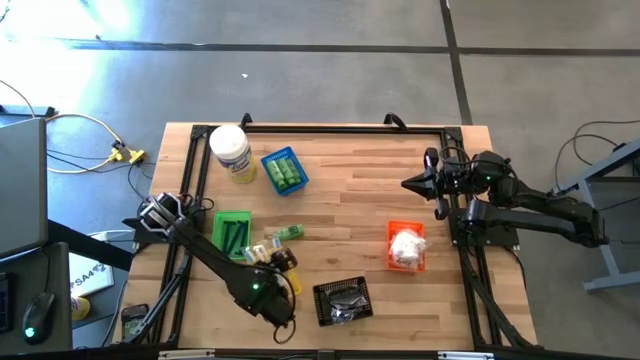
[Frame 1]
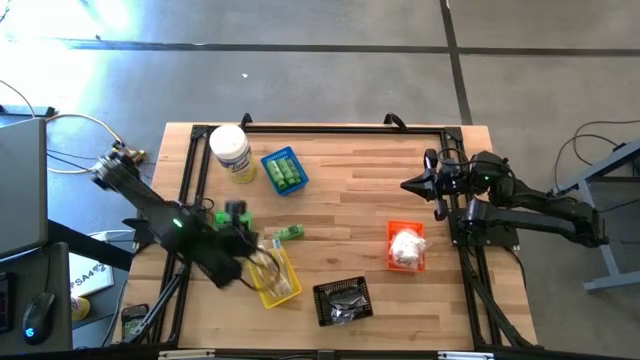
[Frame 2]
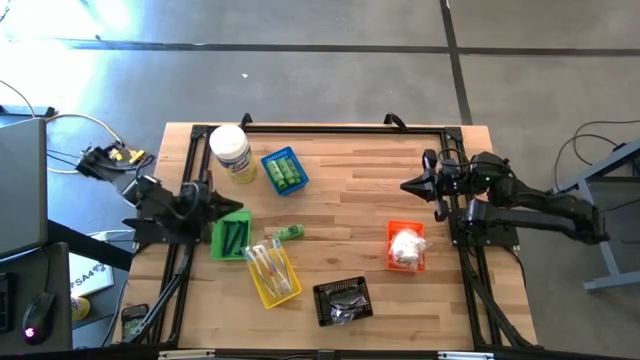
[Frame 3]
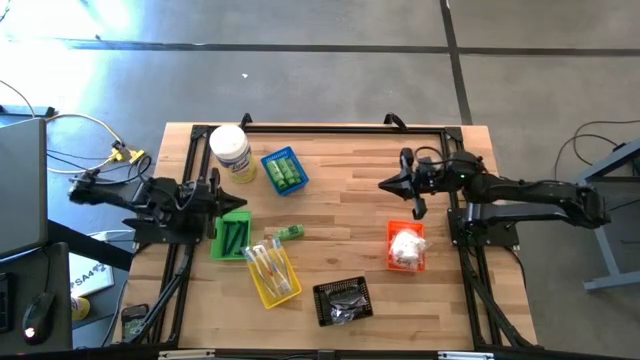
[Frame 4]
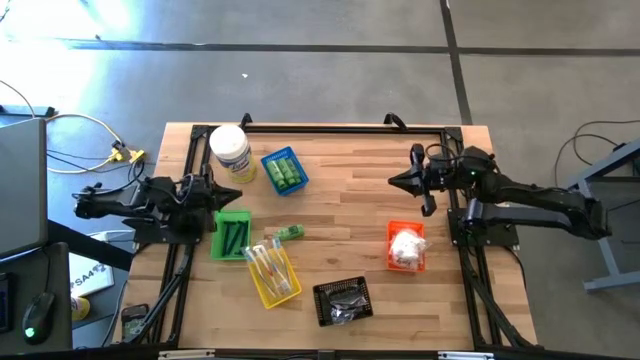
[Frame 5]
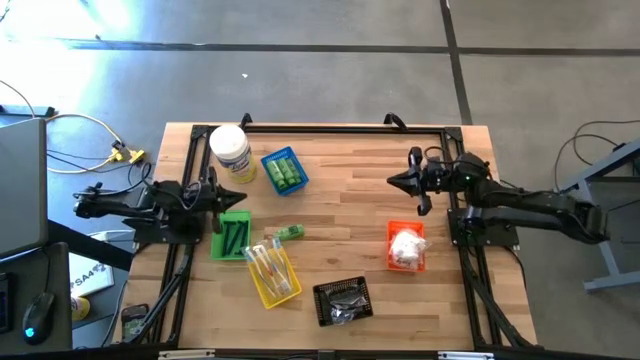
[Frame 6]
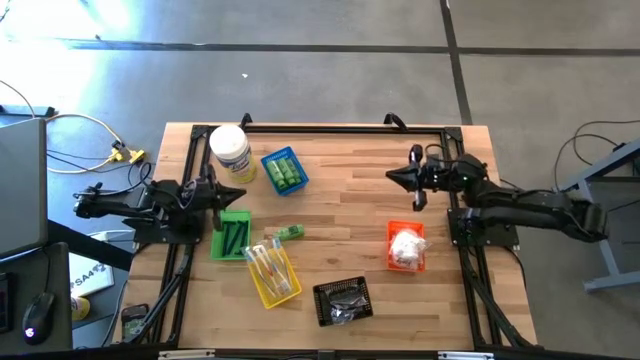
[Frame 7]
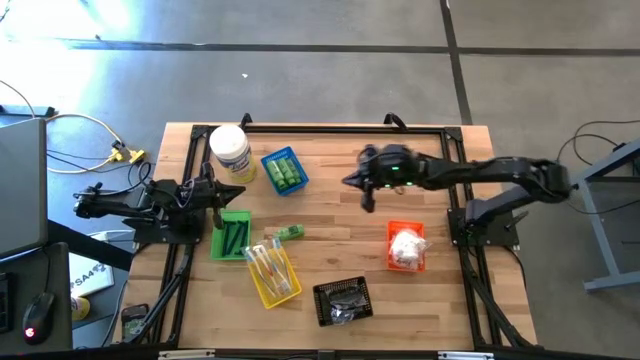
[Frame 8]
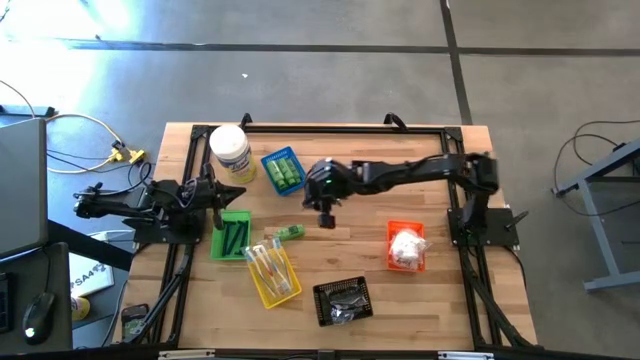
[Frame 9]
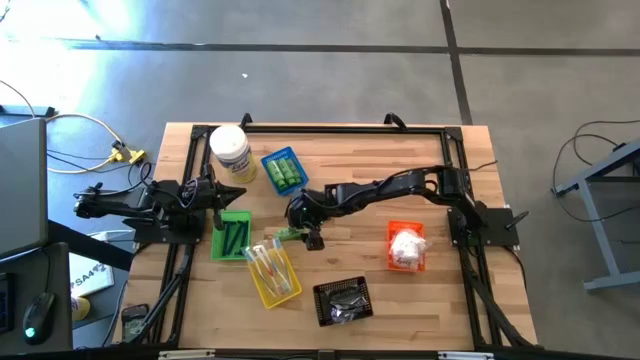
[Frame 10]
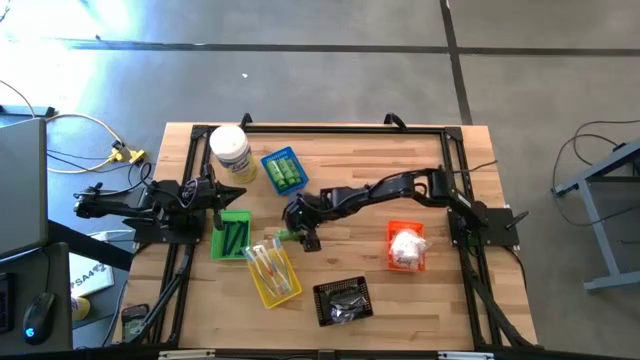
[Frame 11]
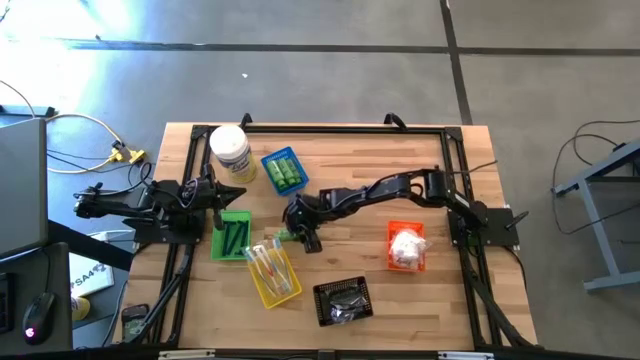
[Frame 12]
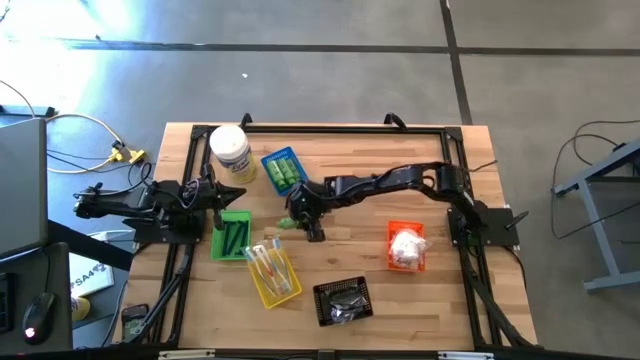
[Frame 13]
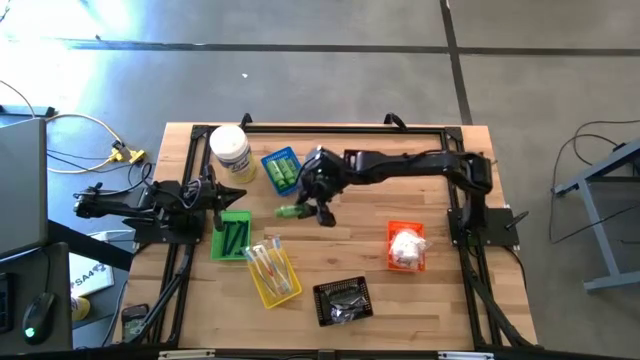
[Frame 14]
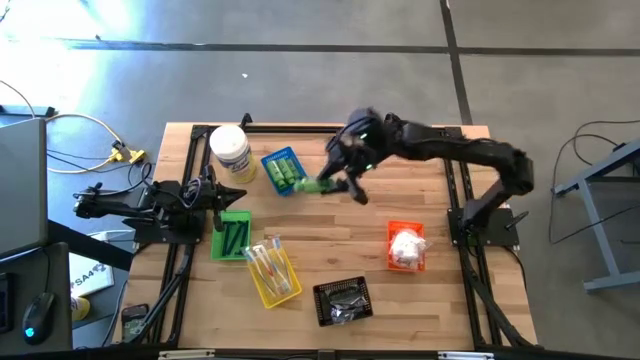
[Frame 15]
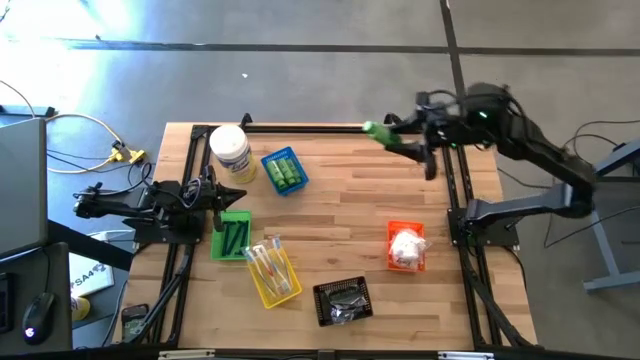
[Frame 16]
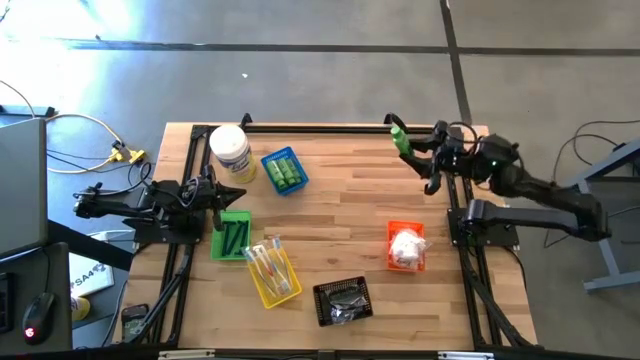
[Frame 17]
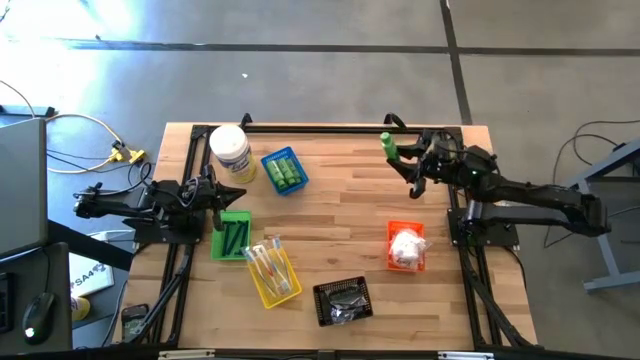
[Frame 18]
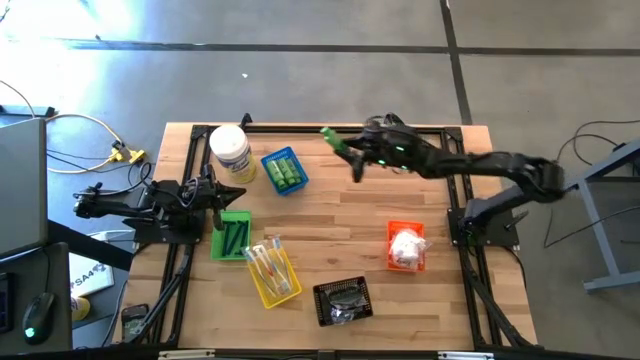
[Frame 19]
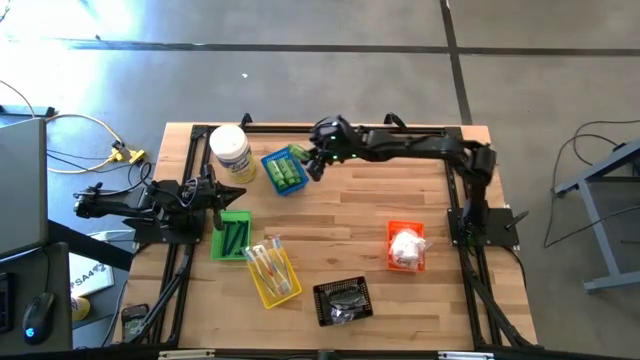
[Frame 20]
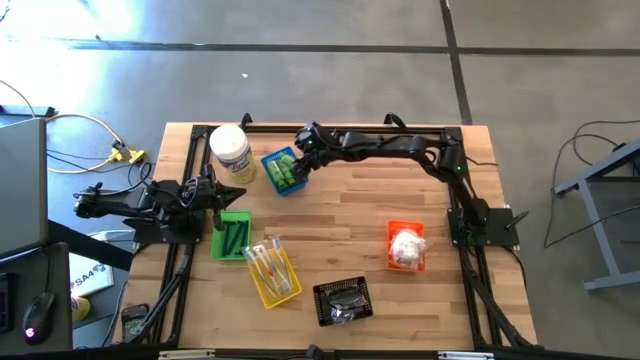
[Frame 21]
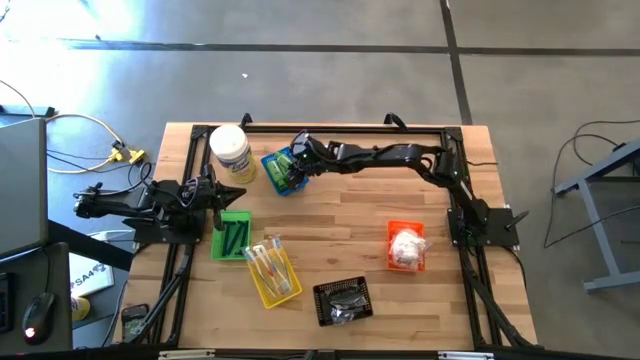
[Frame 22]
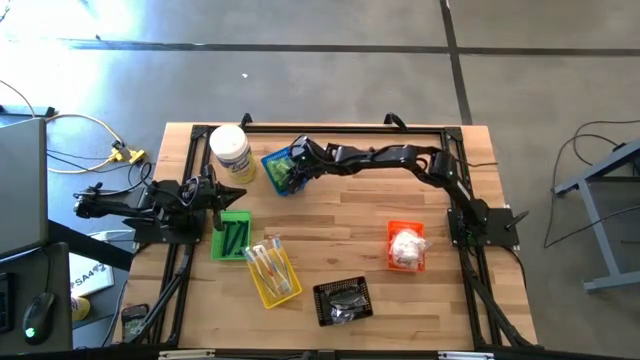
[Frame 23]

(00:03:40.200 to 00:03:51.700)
Task: Pick & Place Travel size toiletries
Put the green shampoo into the blue bin

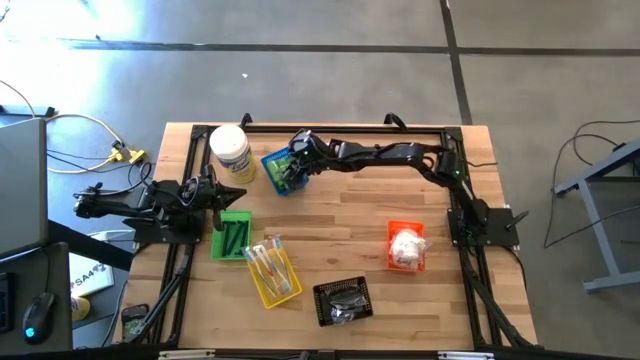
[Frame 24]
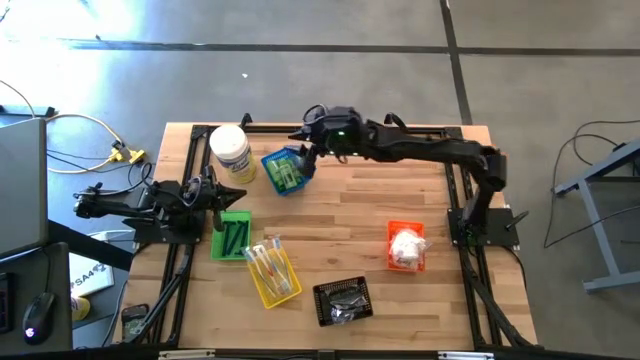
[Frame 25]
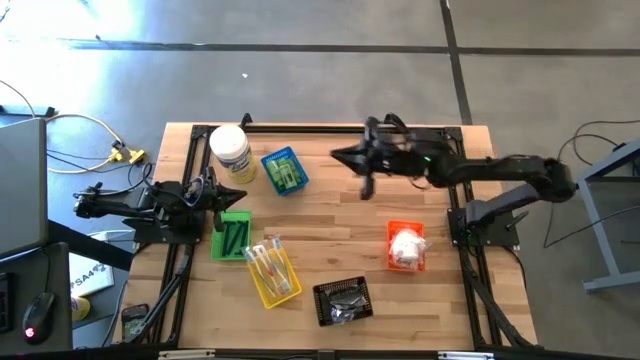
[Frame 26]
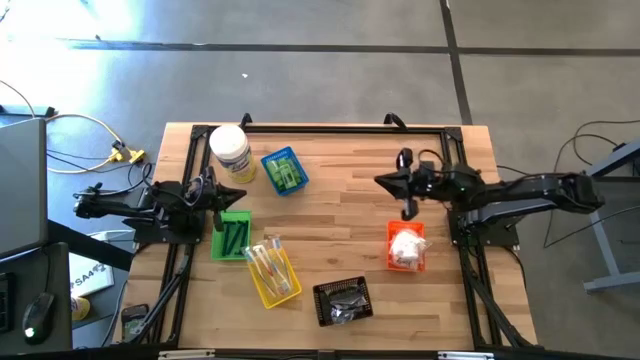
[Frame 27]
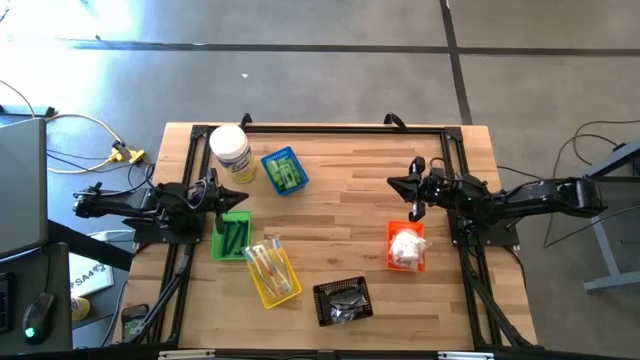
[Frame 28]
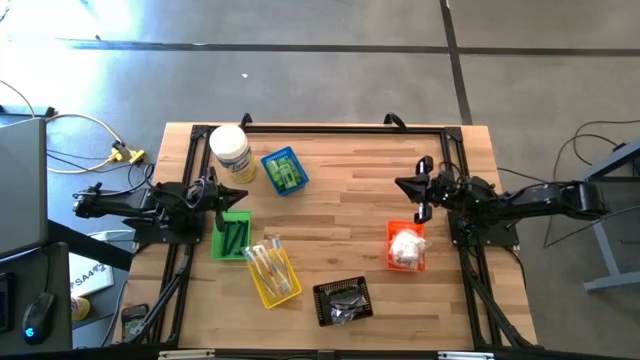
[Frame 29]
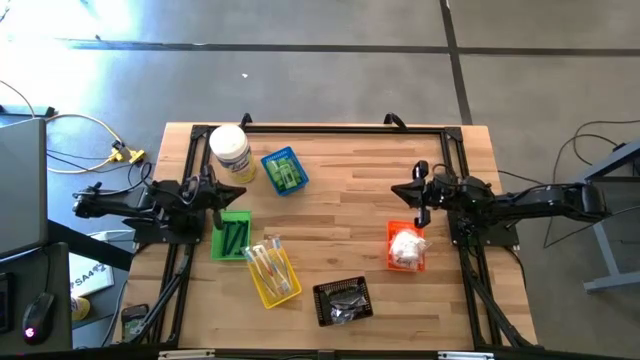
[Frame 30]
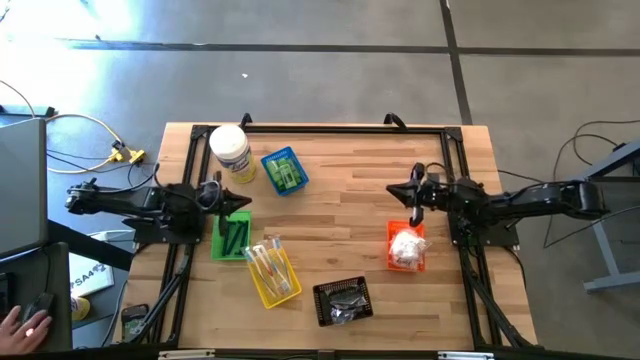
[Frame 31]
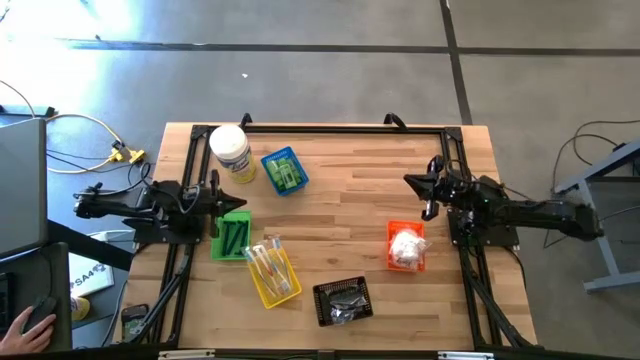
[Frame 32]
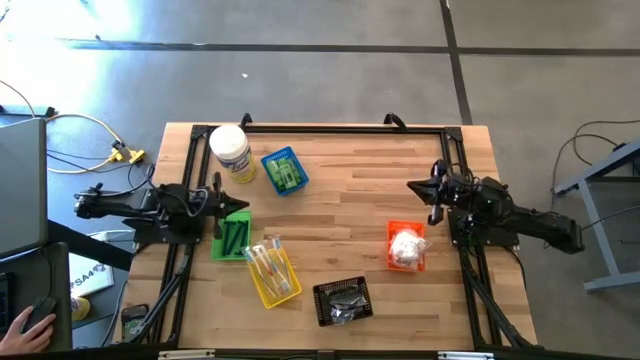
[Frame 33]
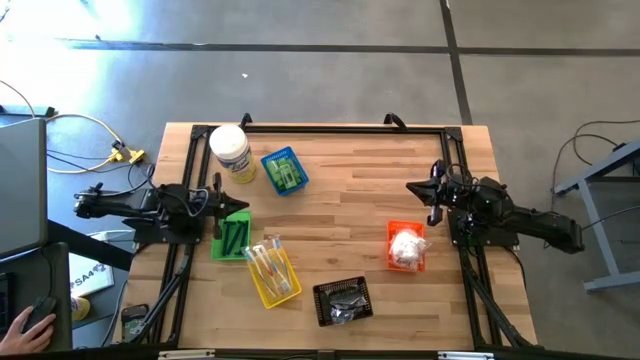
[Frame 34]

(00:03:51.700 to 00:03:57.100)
Return to Home Position

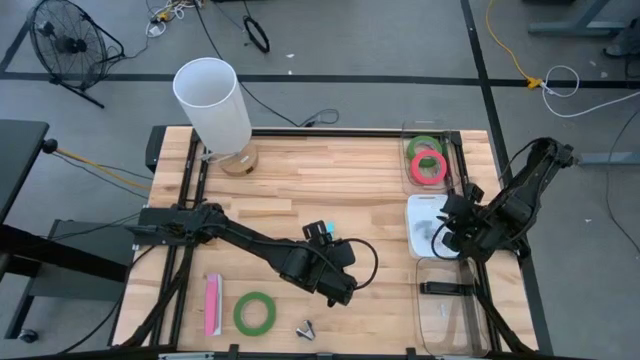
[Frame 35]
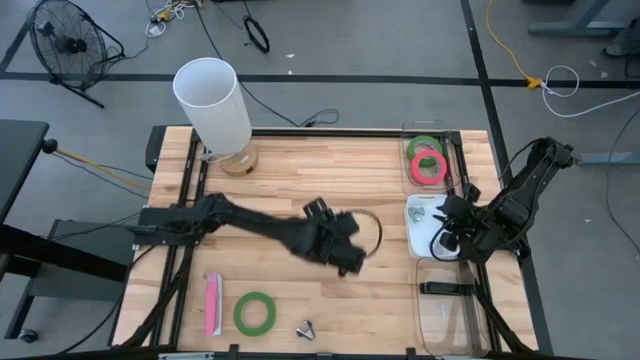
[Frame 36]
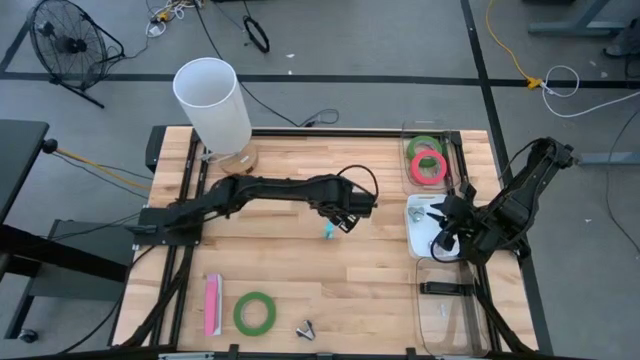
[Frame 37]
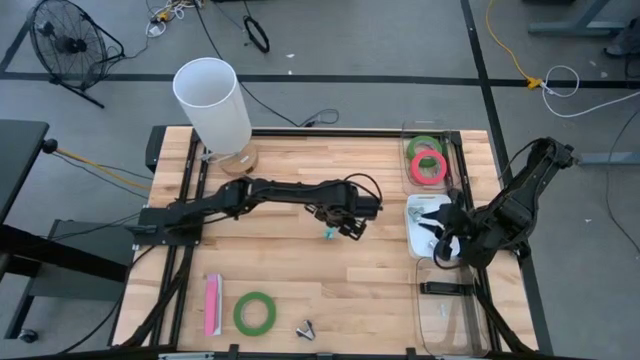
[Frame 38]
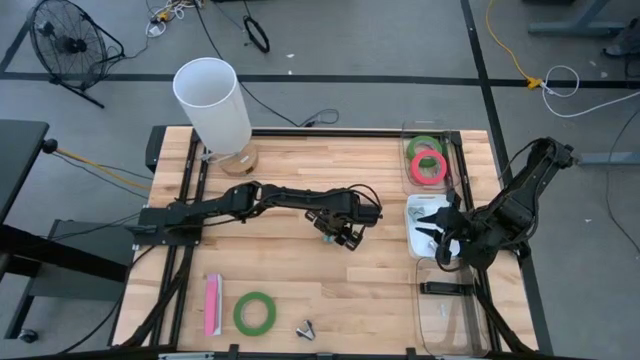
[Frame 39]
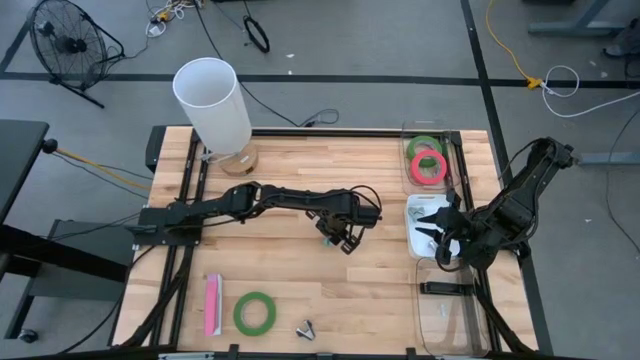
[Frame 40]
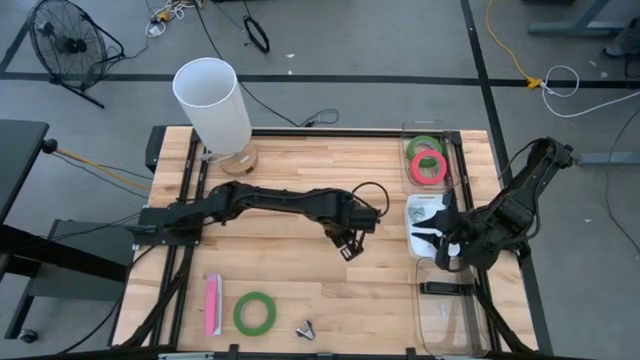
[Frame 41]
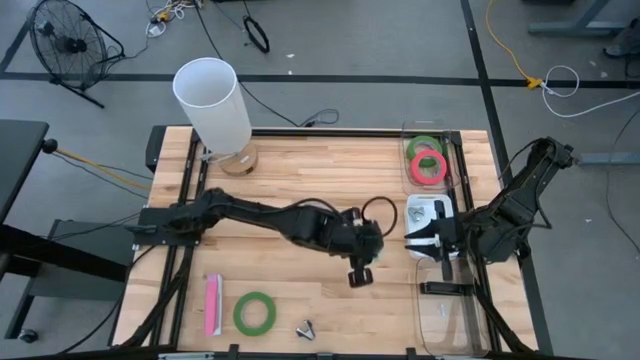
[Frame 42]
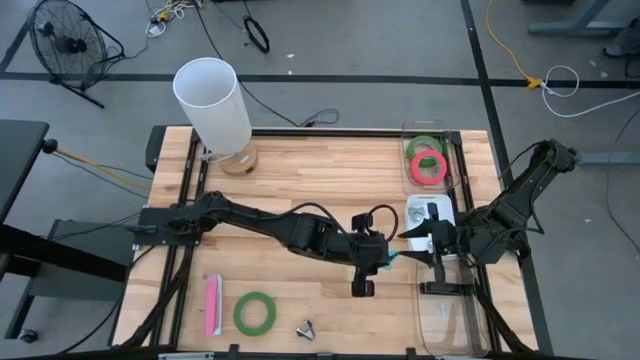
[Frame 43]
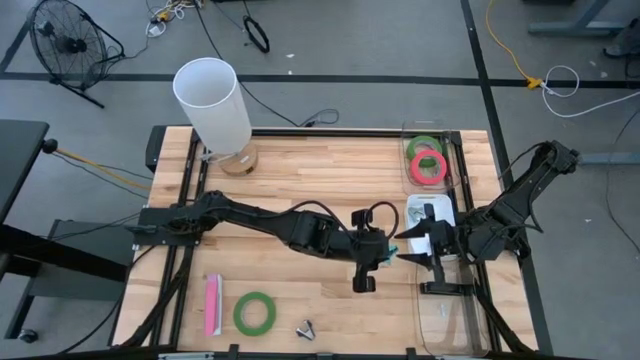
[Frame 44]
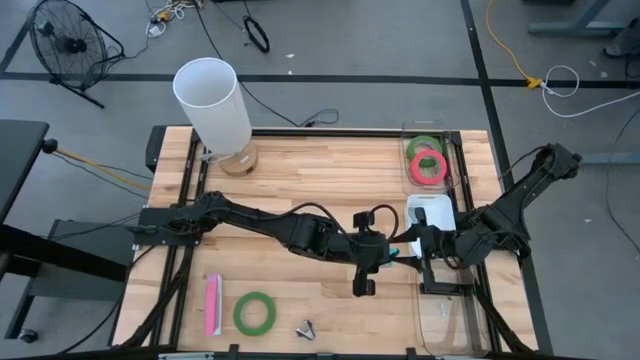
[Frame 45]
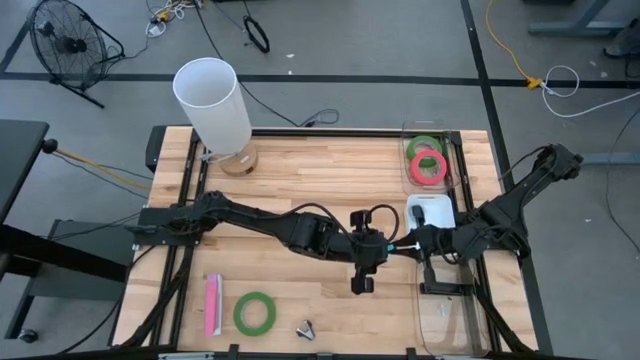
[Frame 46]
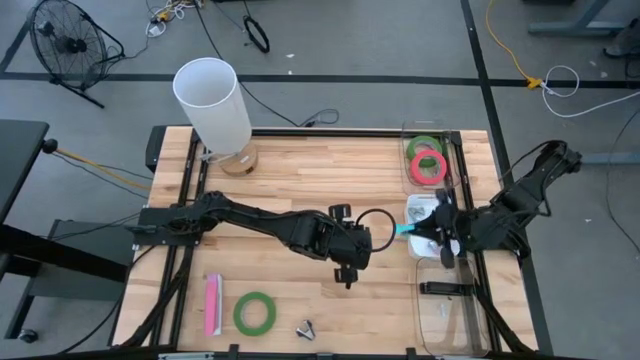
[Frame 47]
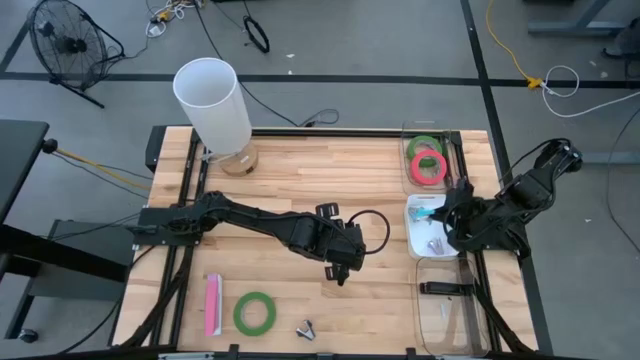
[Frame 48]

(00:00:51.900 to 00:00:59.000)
Task: Pick and place Stapler, Stapler remover, tape
Put the light blue stapler remover into the white bin
